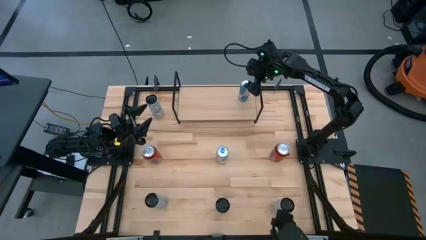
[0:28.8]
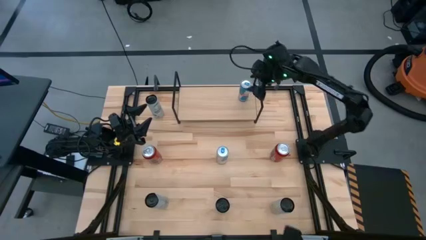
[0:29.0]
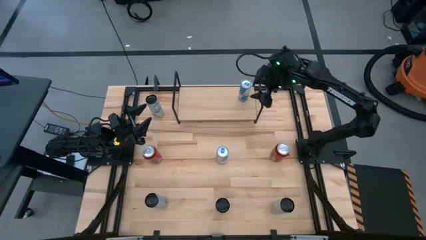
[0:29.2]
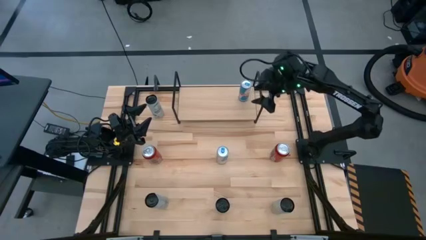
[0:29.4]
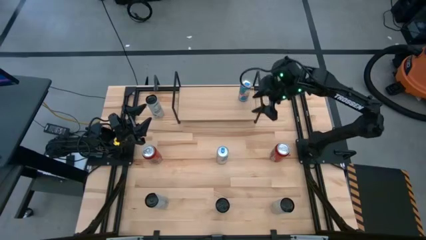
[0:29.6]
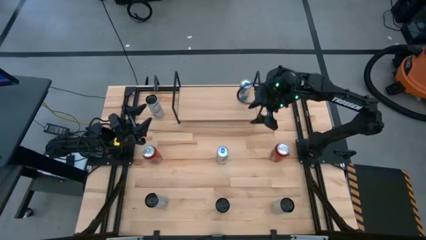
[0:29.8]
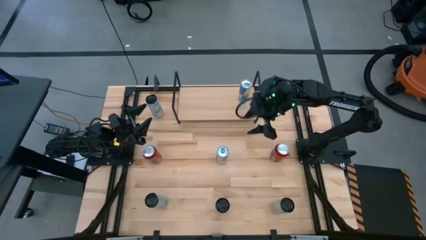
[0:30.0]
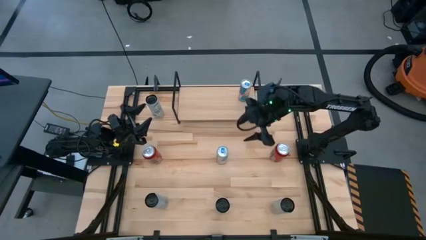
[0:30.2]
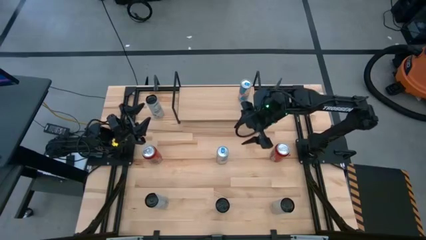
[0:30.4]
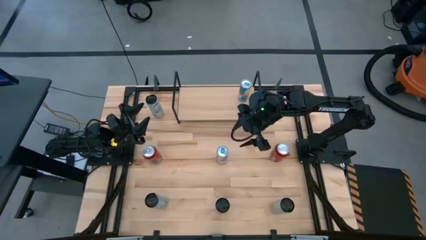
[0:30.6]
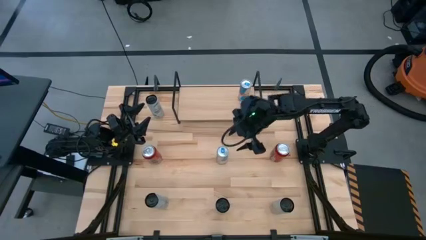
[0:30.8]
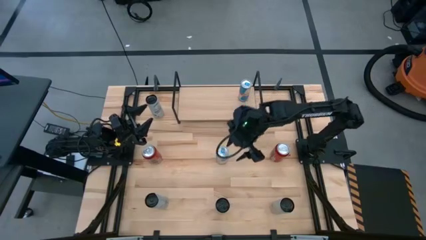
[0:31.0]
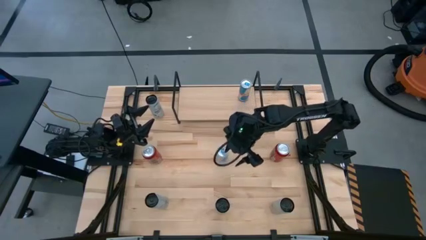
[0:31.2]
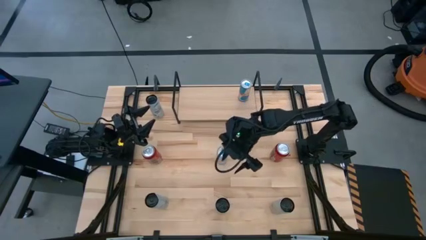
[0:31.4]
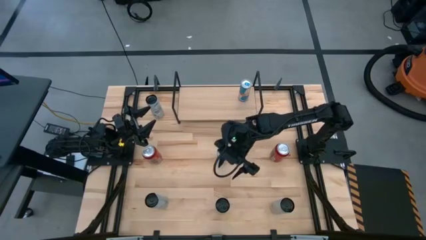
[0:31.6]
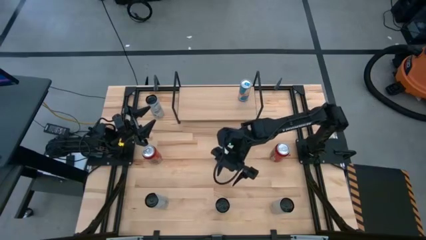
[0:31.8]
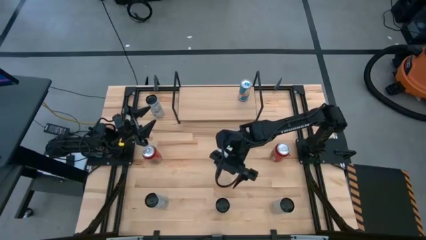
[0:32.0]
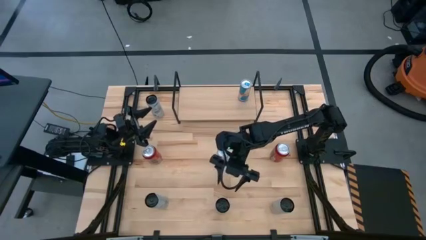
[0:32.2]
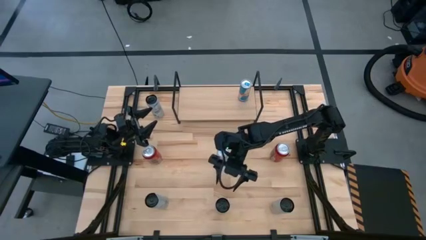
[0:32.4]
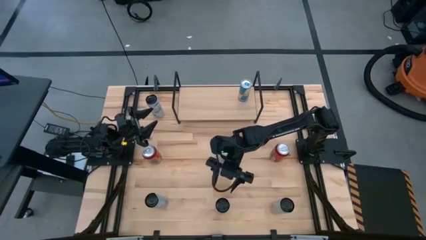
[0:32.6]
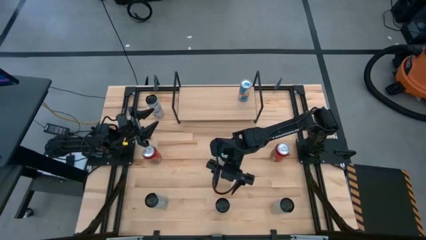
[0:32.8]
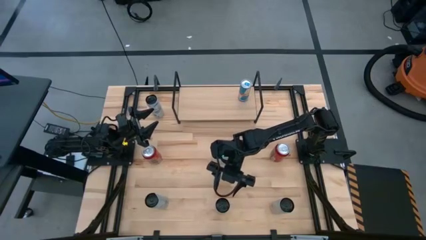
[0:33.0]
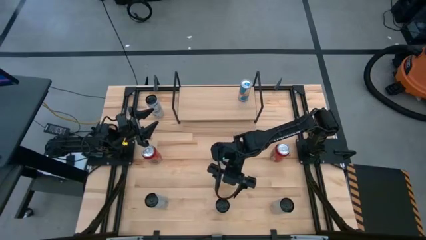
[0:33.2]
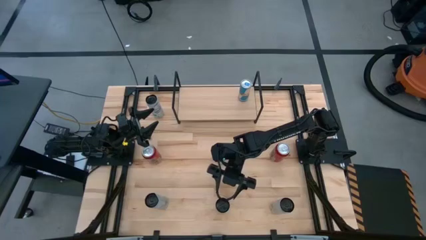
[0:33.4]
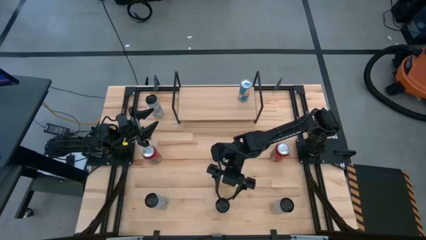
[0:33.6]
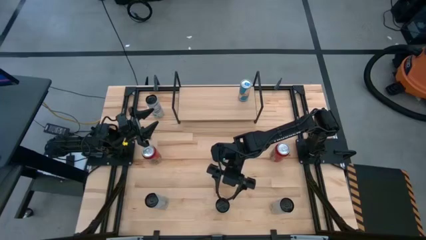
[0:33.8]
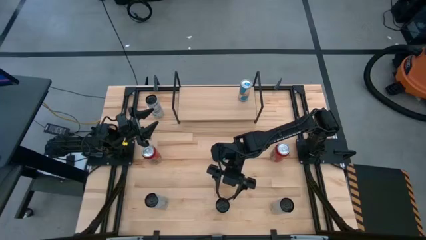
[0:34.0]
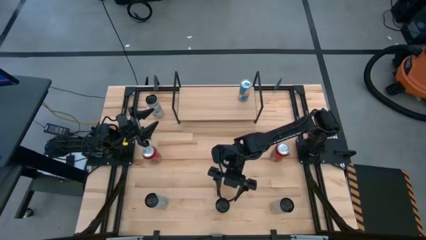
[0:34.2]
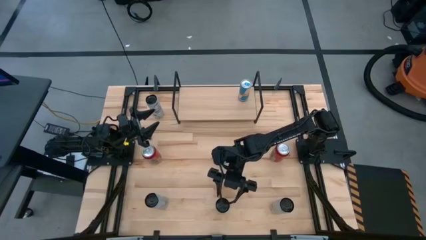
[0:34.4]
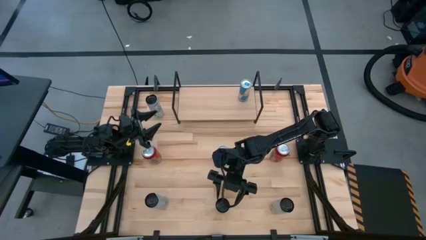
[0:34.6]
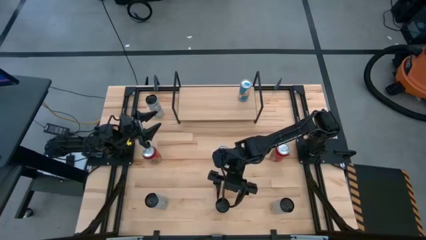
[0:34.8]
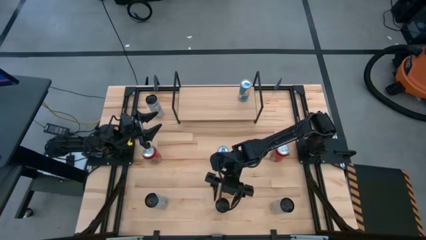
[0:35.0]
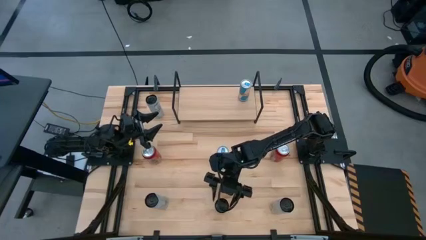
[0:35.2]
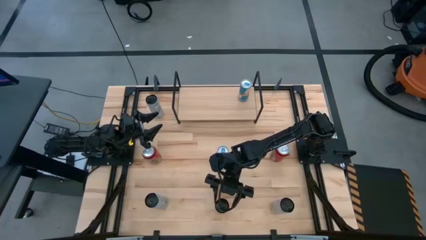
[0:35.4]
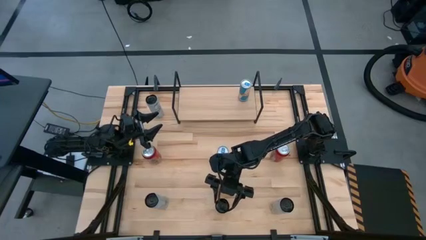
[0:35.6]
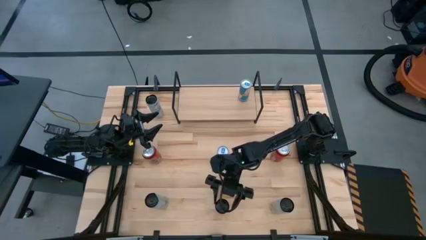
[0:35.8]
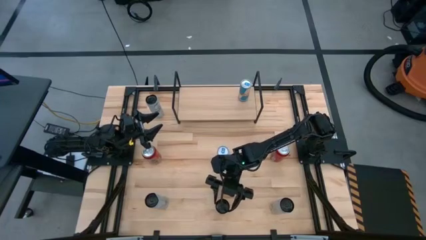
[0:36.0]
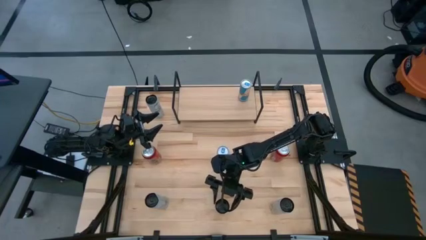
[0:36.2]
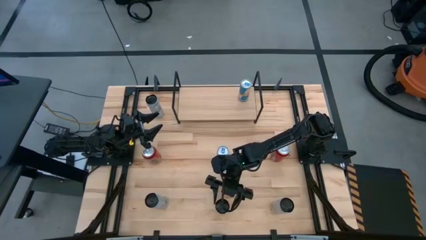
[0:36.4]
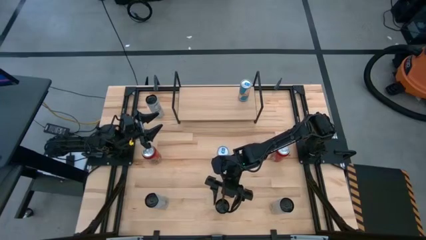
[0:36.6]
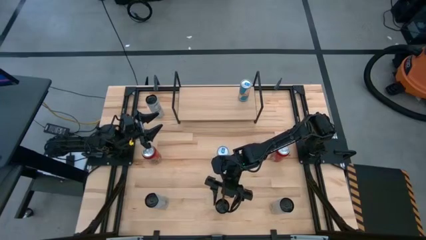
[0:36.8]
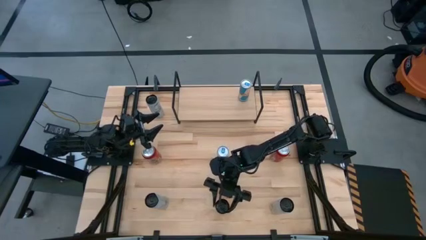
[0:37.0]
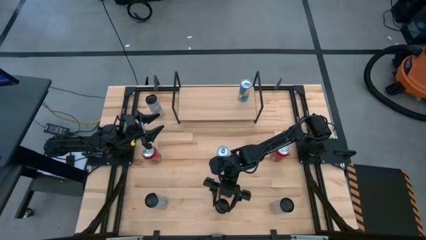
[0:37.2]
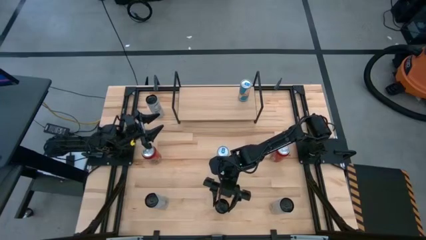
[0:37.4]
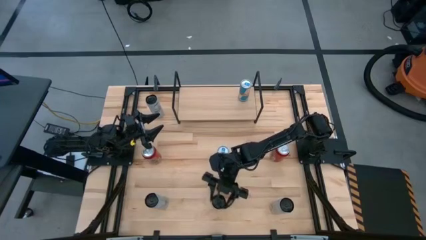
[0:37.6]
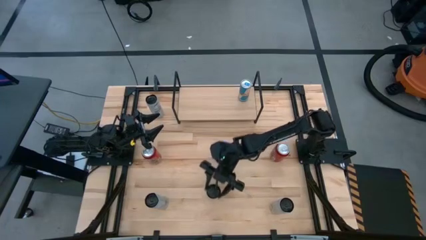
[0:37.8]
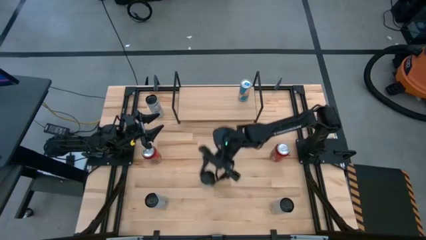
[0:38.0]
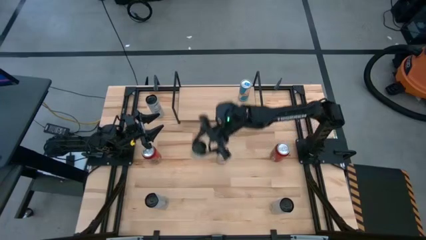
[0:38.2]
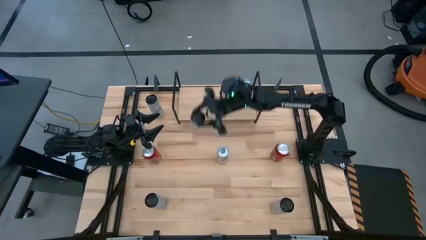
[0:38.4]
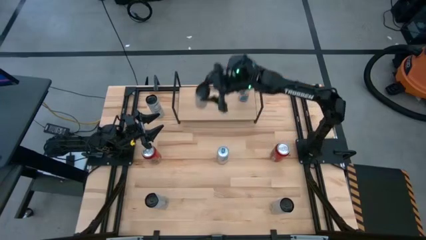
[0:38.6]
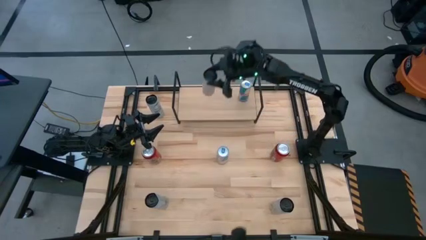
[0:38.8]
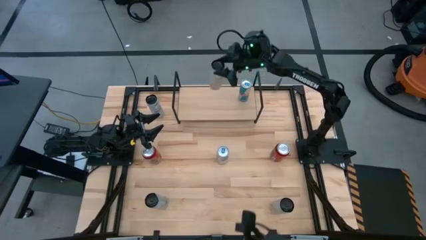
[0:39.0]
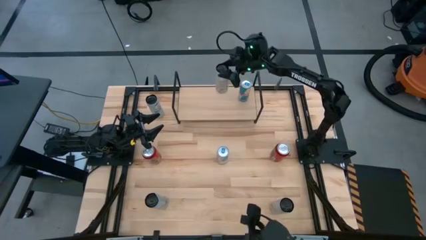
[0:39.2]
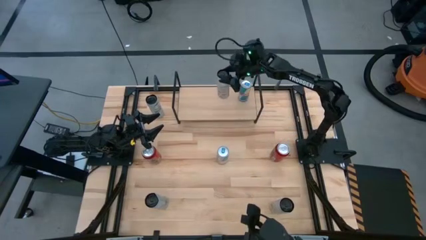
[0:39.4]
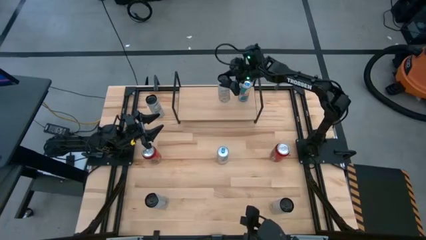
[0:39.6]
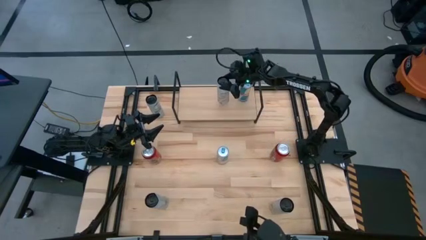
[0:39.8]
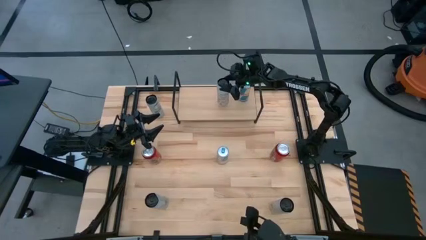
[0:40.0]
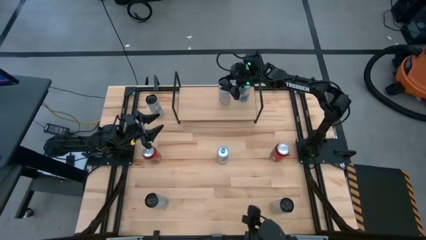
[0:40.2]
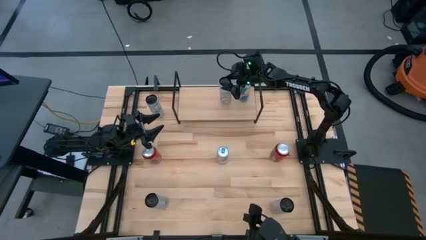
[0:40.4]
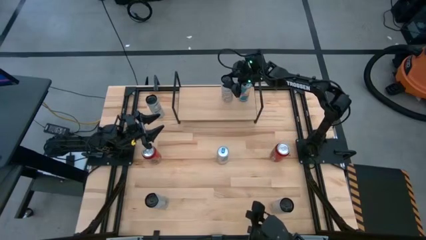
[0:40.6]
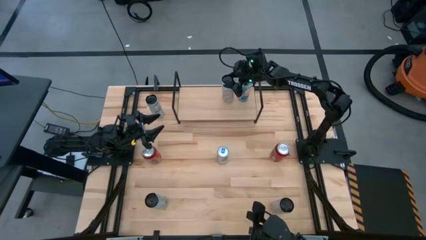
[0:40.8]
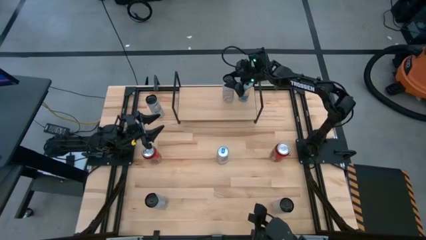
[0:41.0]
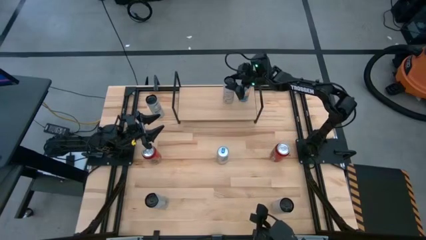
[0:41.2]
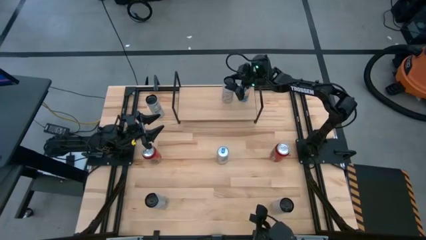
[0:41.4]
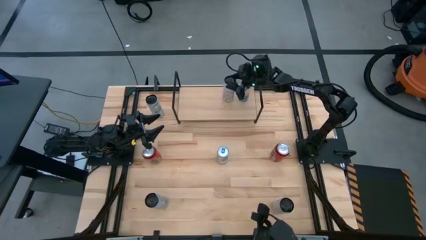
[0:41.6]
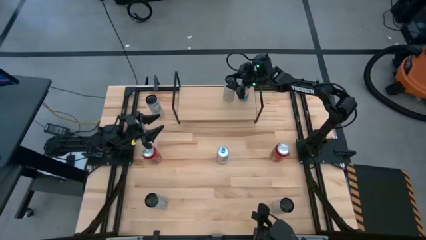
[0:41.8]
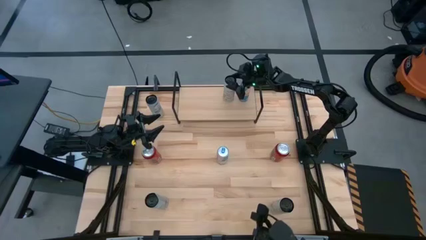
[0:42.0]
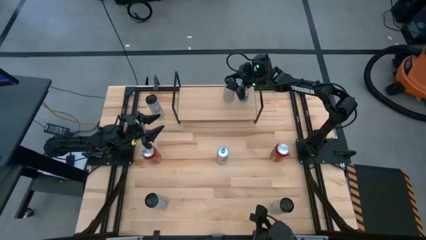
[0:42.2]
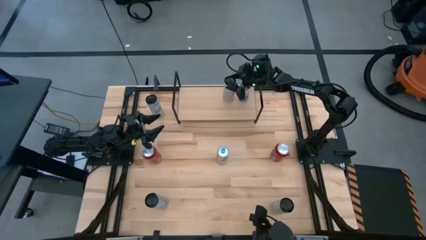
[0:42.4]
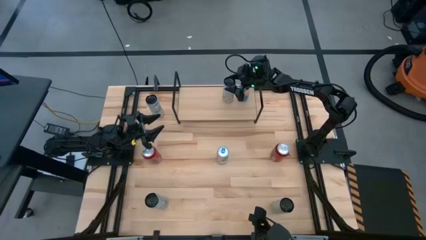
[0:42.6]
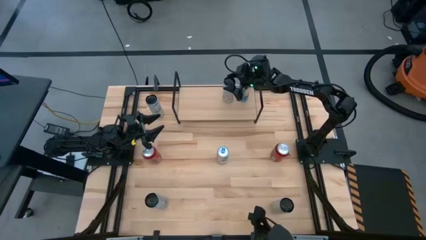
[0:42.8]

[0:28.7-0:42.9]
Task: Place canned beverage on shelf
Put the left white-yellow soda can on the shelf
